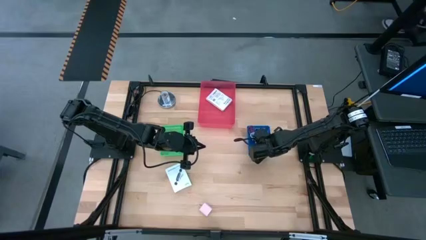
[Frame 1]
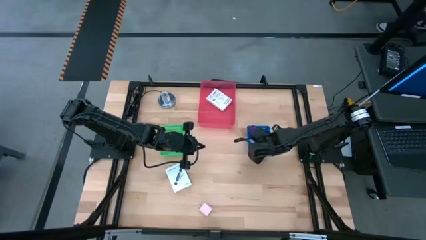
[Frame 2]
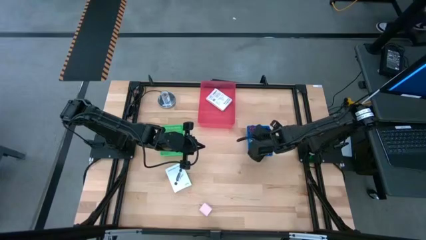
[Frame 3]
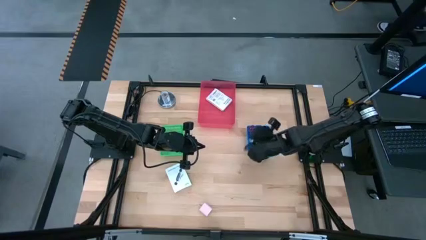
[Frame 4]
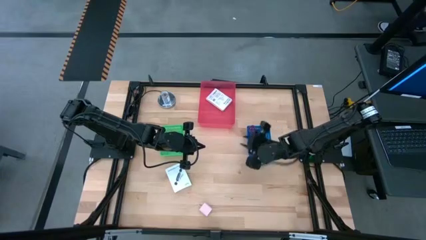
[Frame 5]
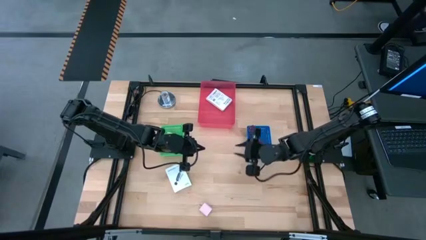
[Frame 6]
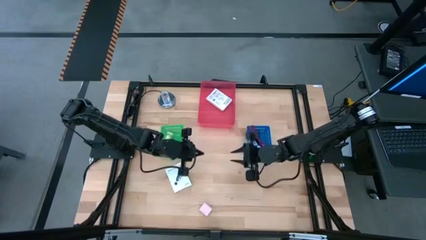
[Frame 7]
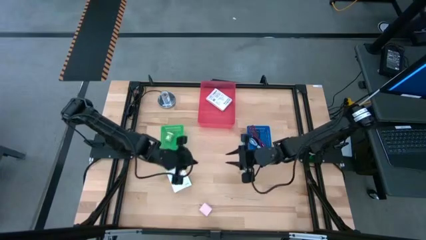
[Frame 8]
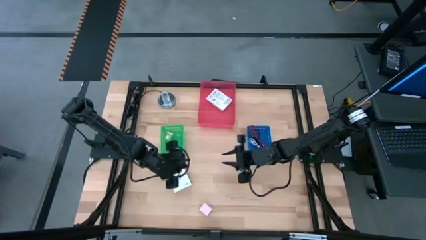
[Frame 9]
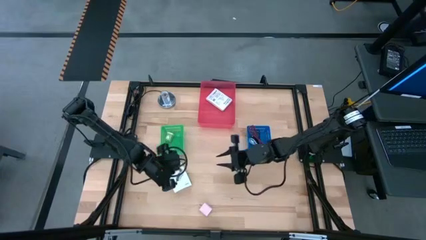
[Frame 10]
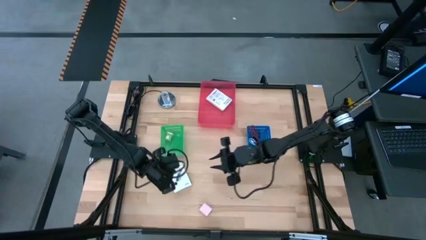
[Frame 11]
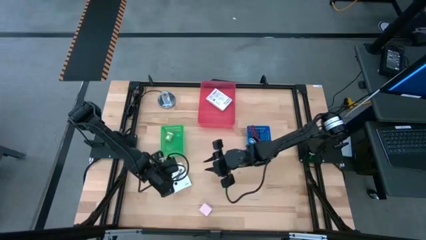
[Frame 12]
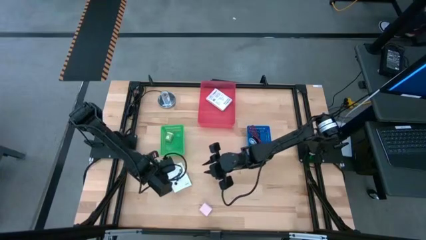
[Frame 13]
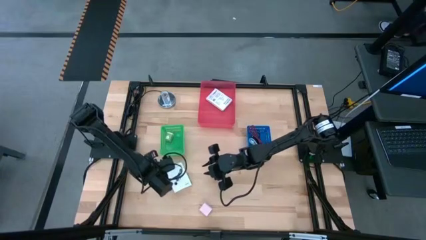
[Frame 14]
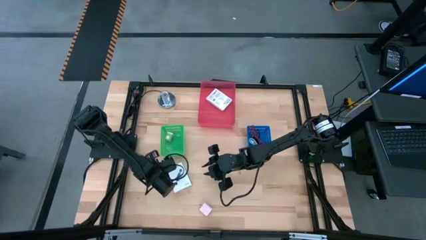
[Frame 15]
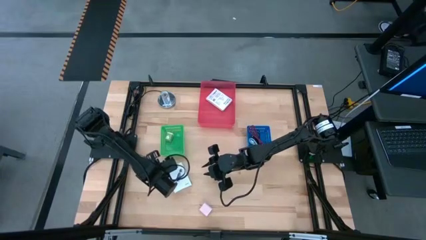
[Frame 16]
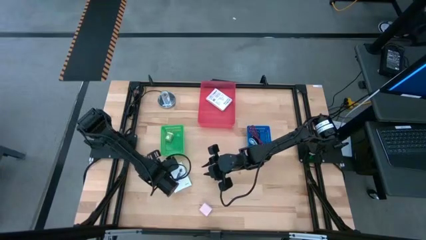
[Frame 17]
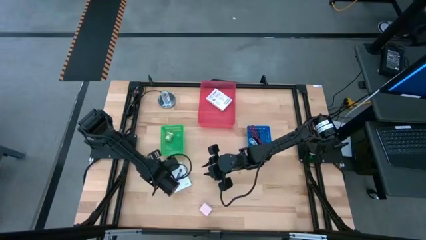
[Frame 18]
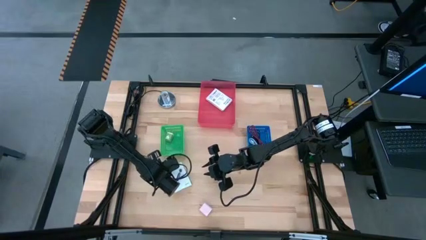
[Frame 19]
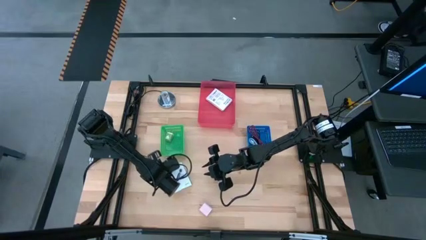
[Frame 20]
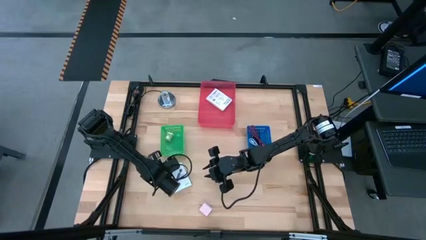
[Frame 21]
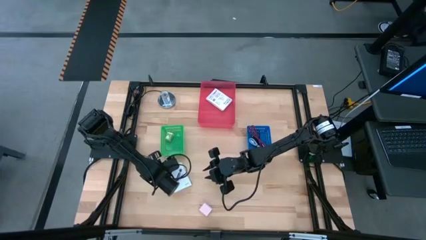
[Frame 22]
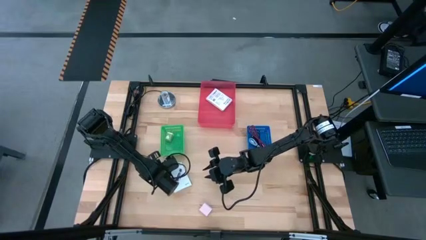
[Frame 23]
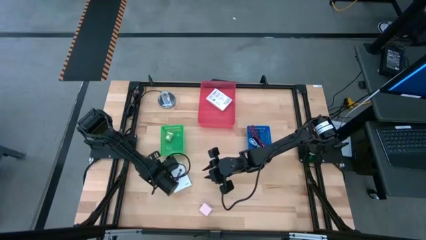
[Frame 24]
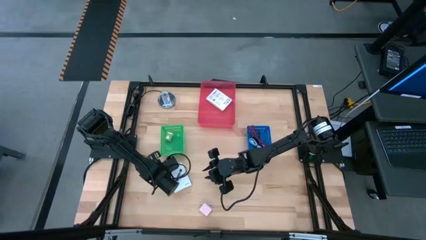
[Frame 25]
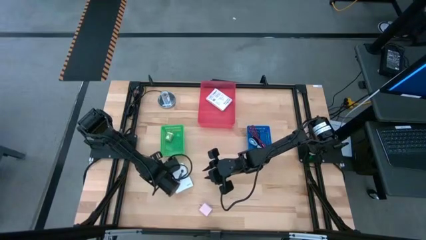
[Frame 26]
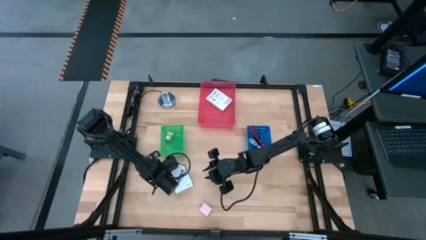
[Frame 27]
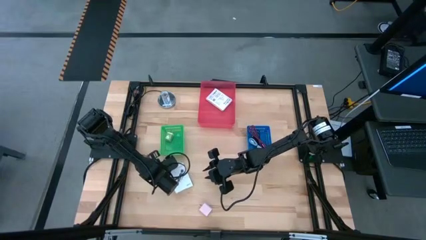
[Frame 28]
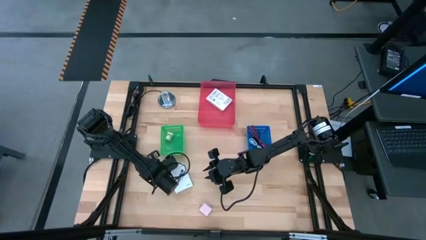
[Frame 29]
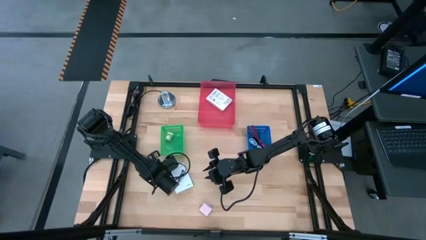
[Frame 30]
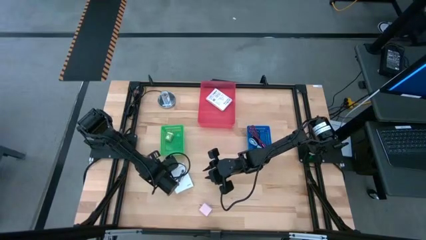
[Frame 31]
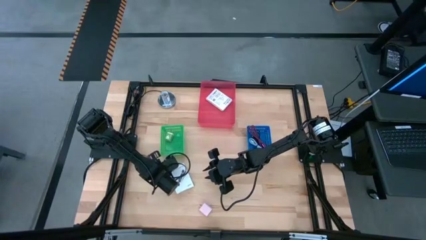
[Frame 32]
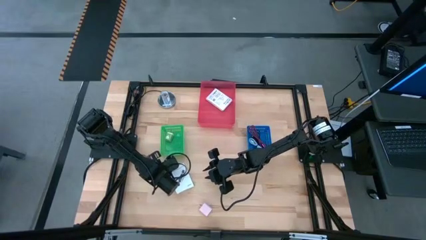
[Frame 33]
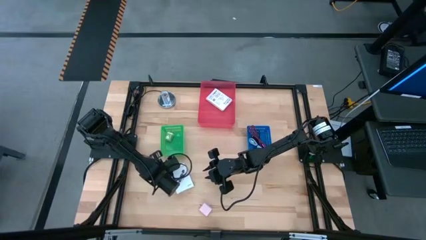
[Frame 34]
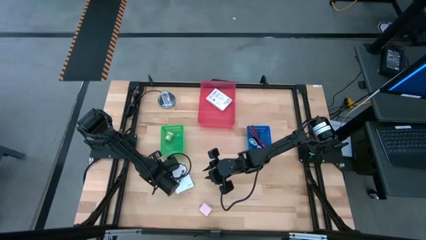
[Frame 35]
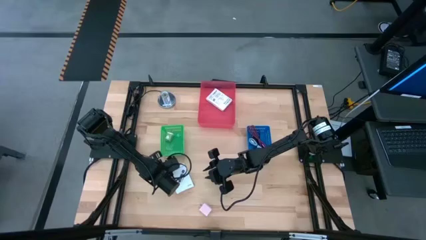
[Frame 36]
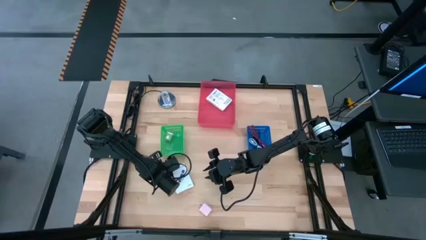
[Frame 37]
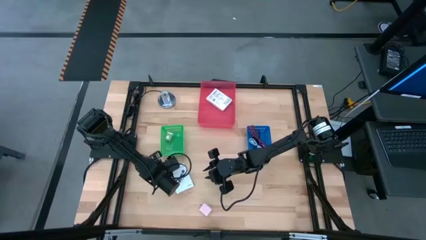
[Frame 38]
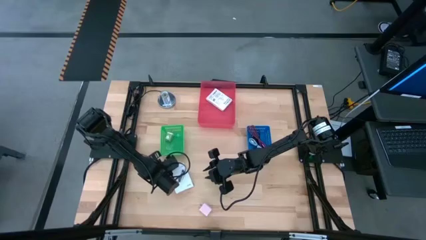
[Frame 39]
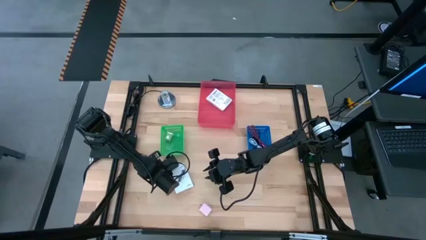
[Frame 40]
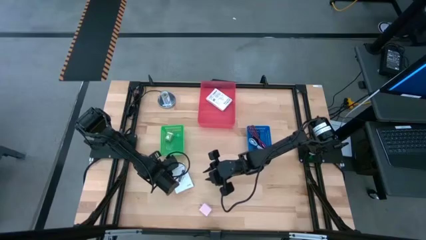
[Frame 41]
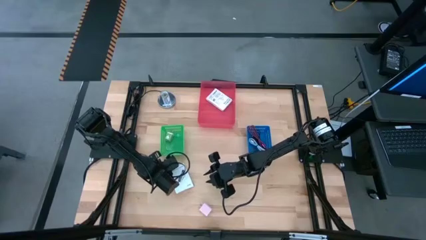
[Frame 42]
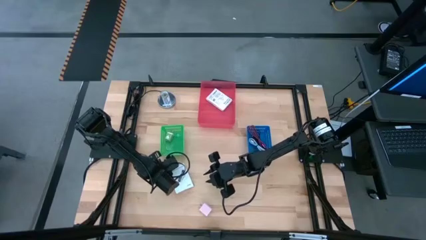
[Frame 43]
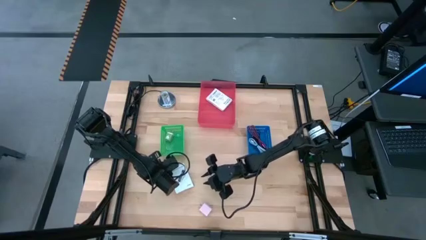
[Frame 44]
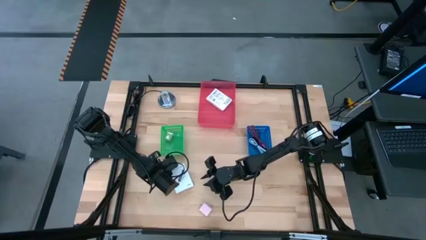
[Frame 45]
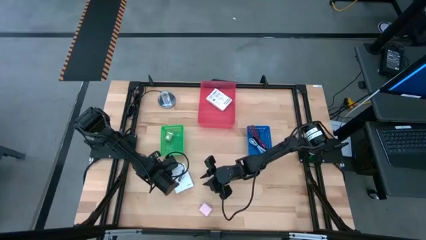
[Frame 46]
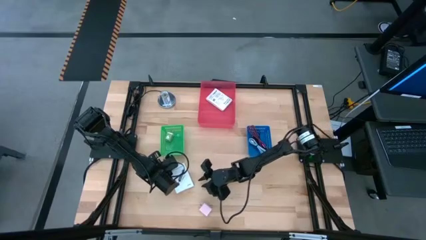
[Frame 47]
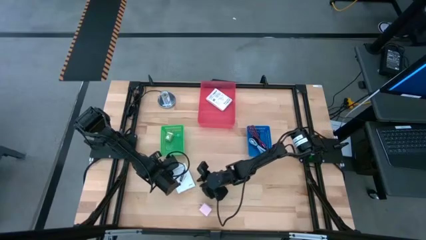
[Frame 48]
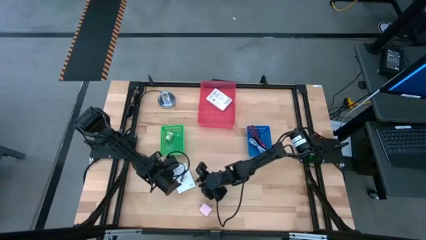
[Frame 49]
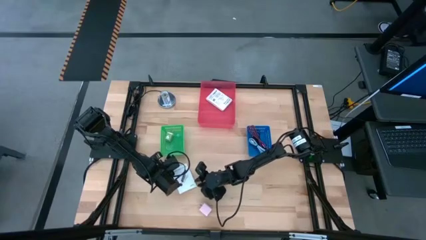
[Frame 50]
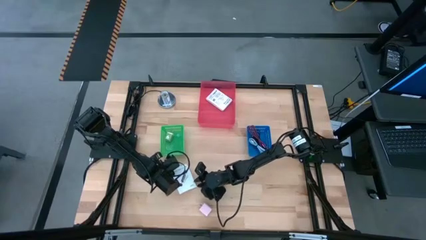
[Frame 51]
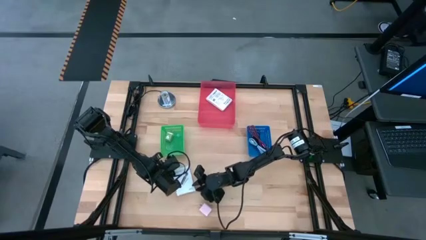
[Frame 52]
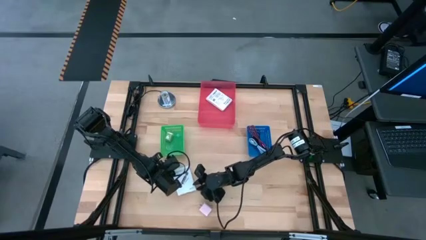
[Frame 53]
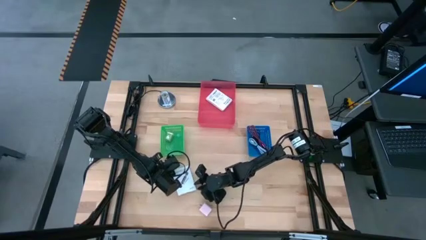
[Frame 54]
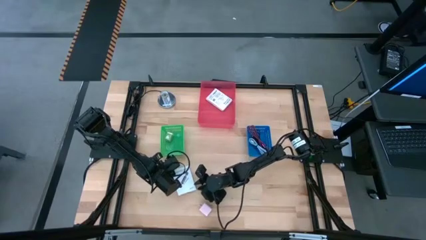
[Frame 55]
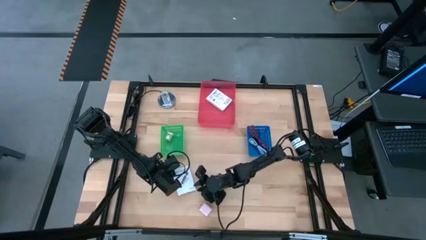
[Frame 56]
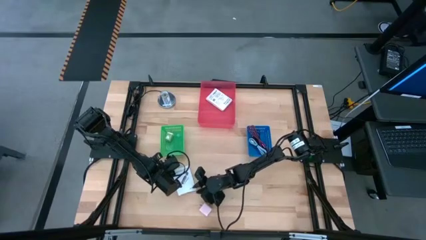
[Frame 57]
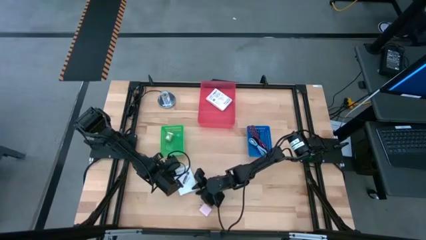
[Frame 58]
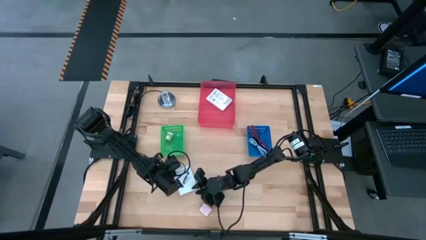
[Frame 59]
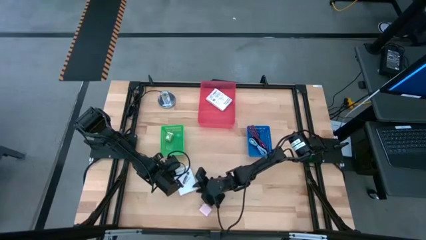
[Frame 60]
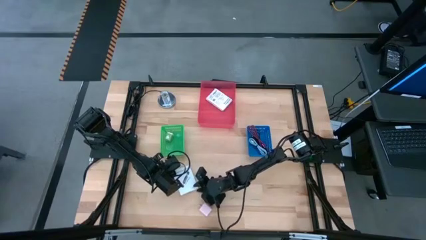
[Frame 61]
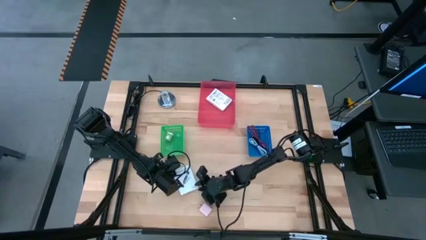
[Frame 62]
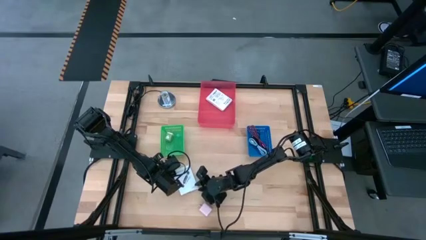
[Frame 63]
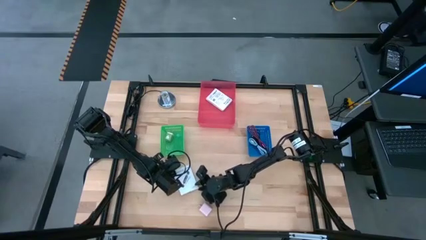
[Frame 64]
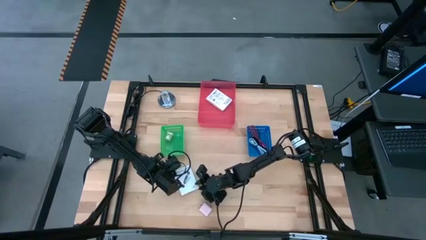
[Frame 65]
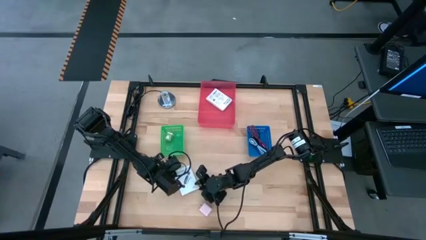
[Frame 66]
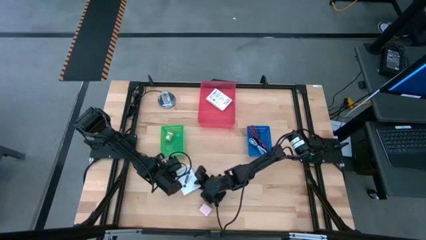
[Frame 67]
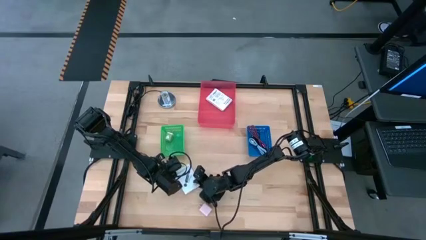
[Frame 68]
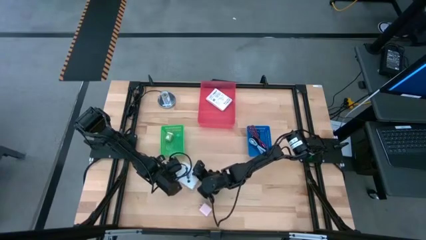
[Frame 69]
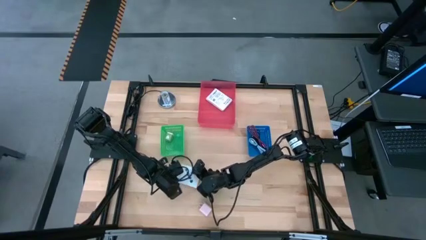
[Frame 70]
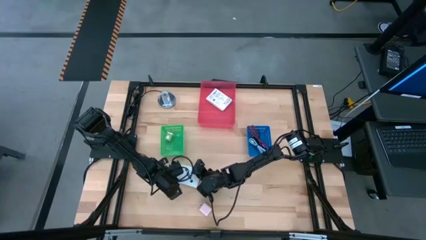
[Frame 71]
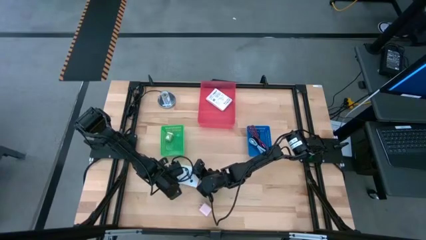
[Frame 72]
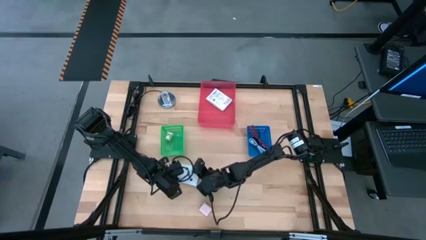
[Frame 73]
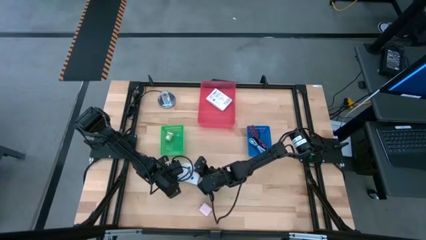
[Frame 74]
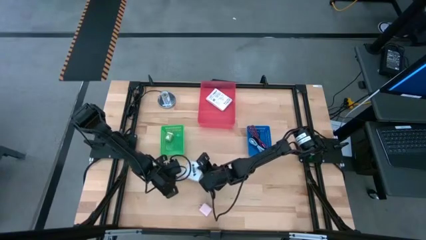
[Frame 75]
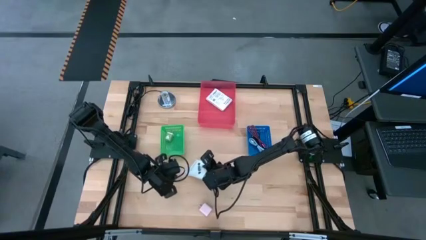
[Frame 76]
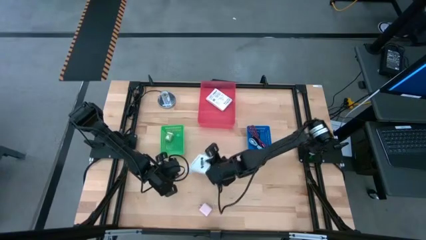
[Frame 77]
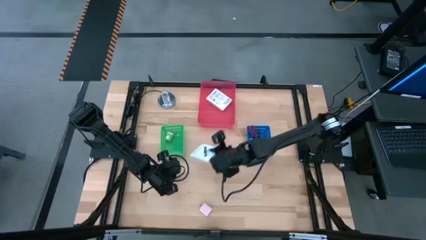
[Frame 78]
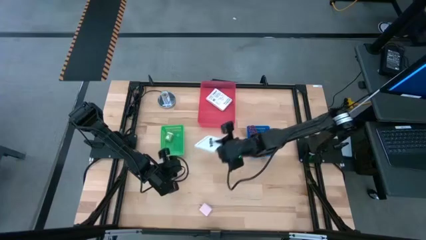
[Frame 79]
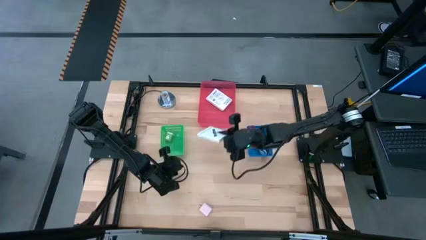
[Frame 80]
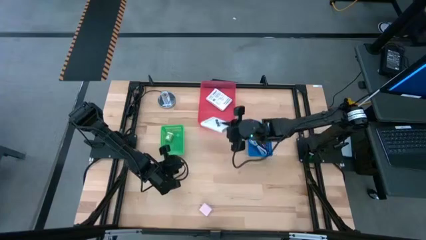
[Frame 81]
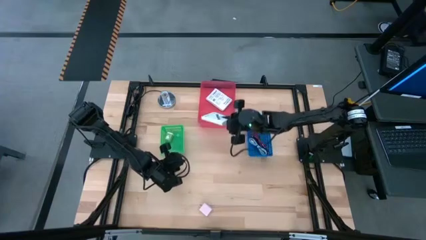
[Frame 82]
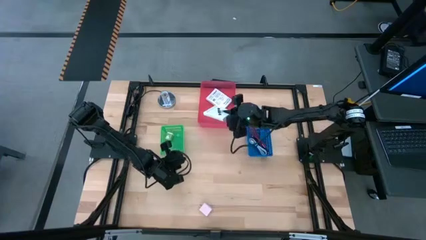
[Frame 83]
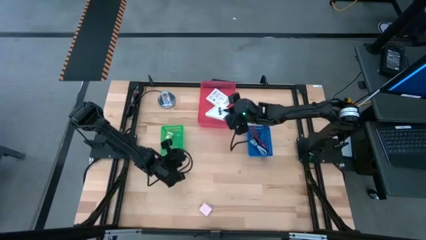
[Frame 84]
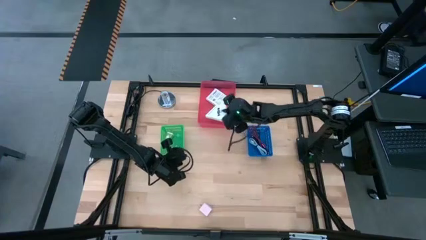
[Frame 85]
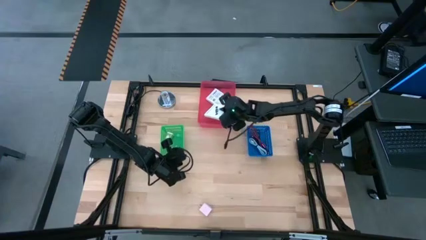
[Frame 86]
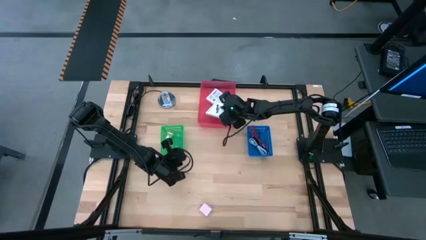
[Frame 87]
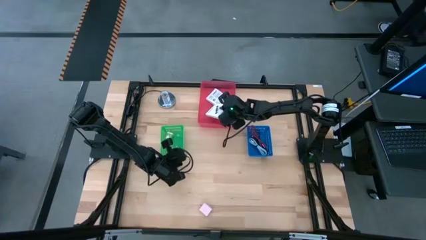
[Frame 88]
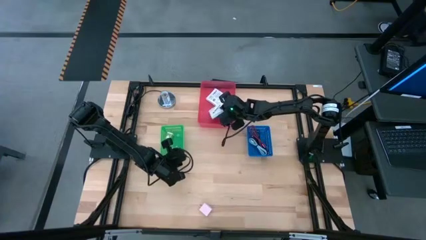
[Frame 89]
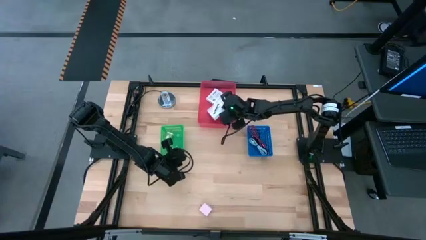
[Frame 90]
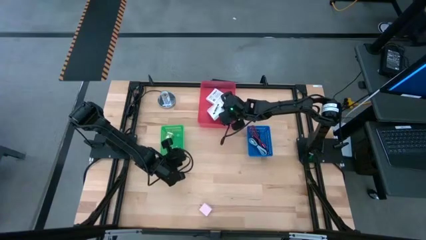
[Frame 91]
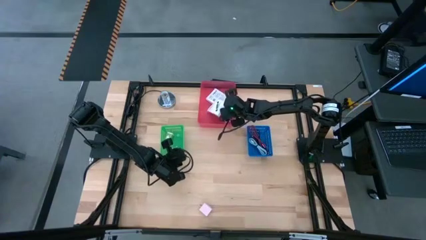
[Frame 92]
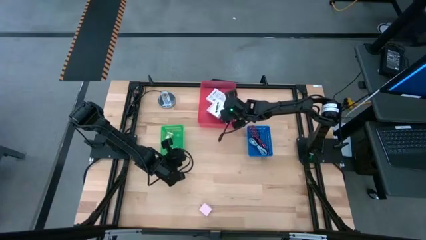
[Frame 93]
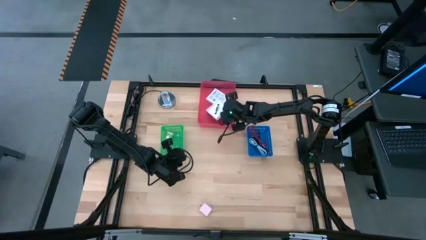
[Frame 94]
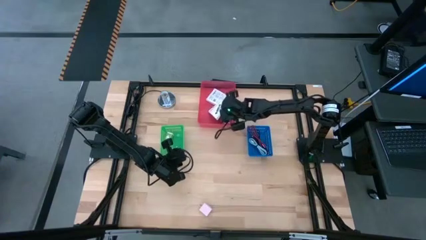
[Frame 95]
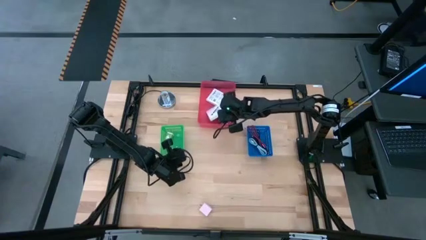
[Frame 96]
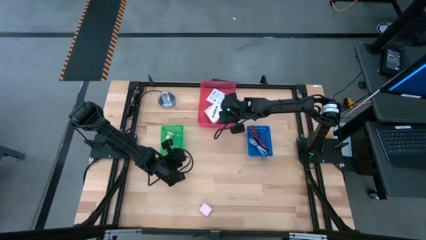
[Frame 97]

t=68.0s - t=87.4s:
Task: Pick and place items into bin
Put the white card reader box into the red basket
